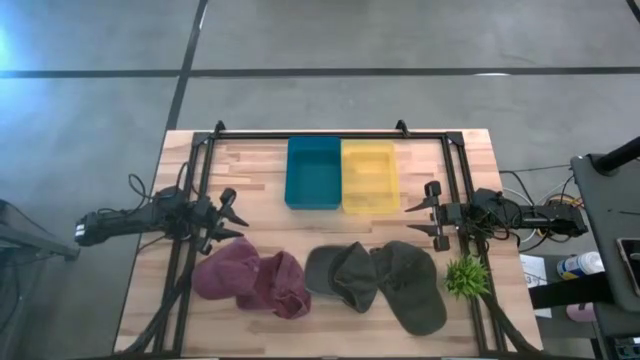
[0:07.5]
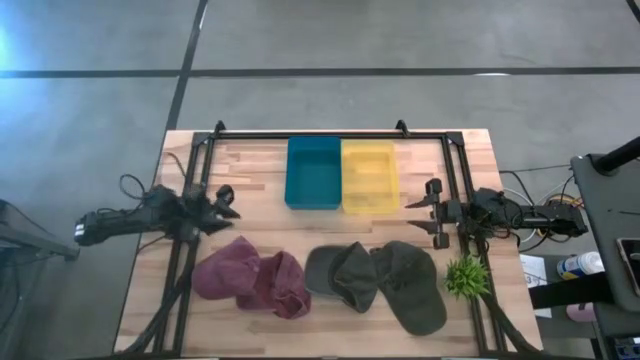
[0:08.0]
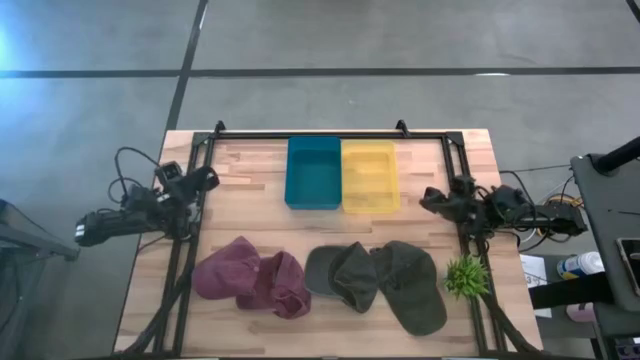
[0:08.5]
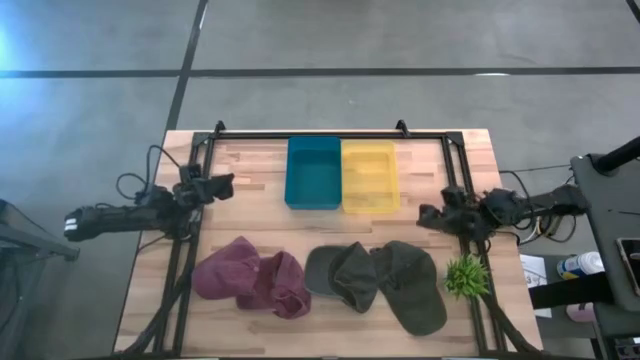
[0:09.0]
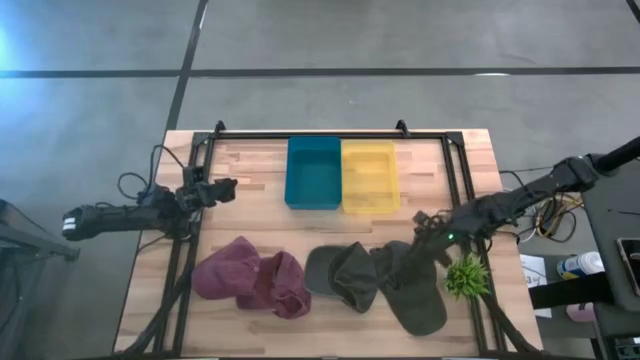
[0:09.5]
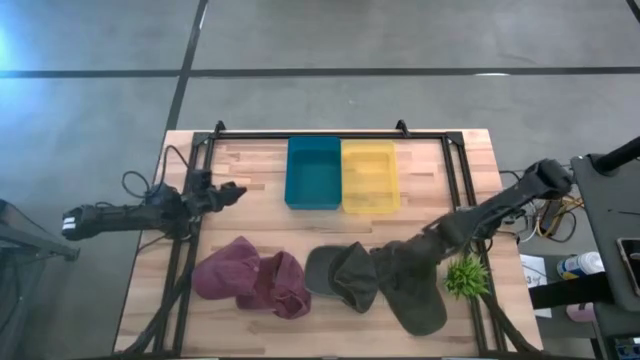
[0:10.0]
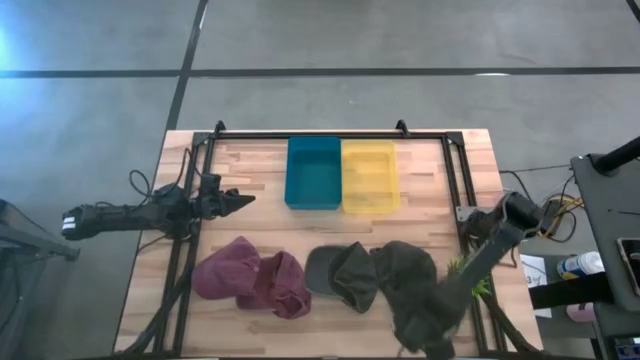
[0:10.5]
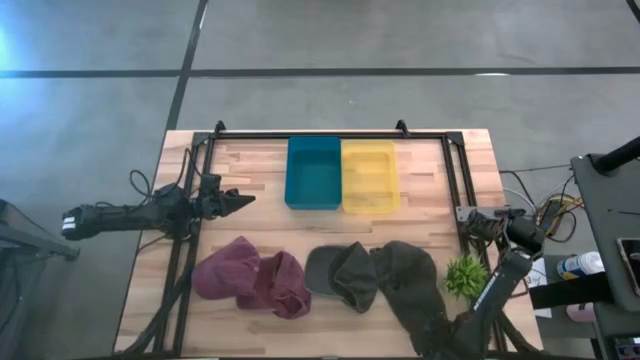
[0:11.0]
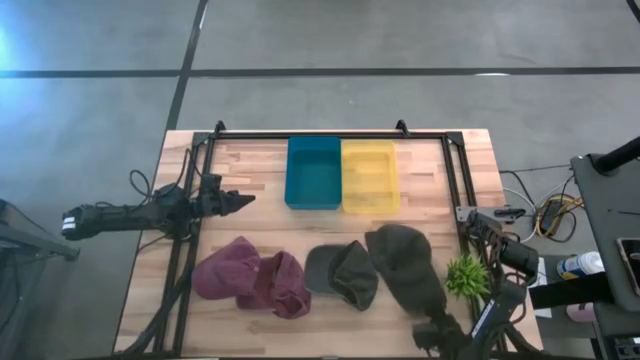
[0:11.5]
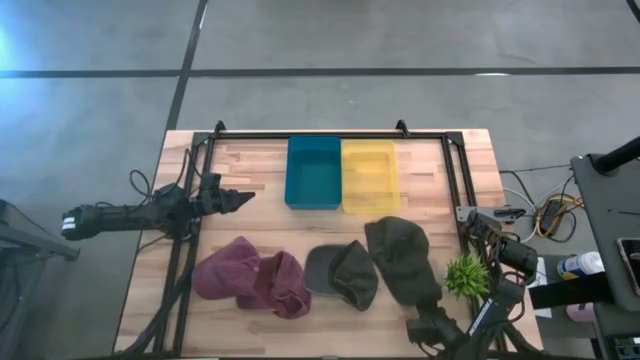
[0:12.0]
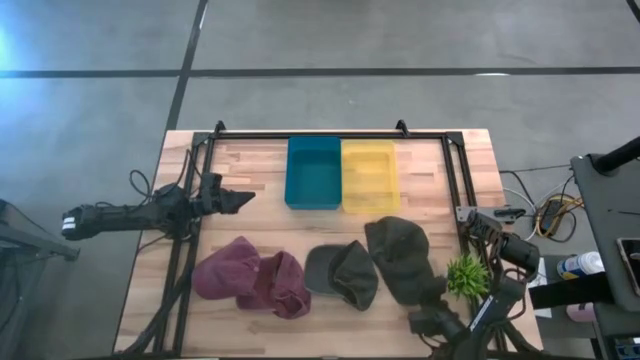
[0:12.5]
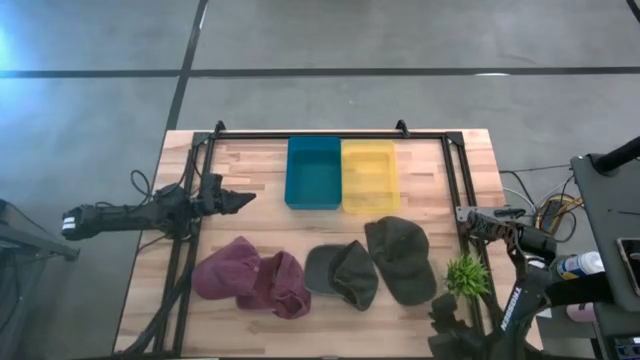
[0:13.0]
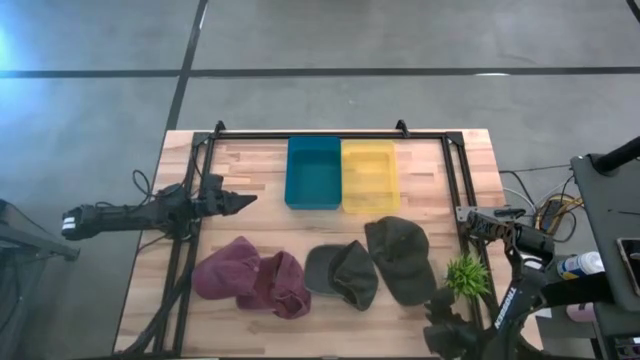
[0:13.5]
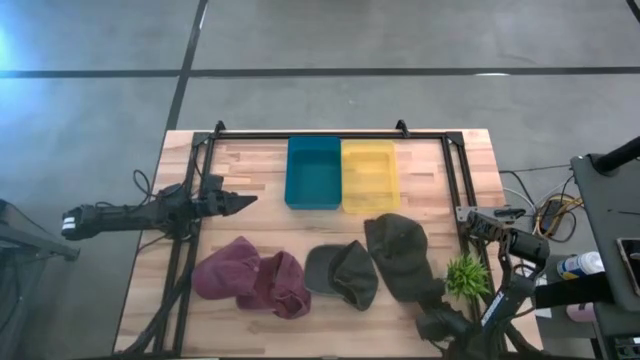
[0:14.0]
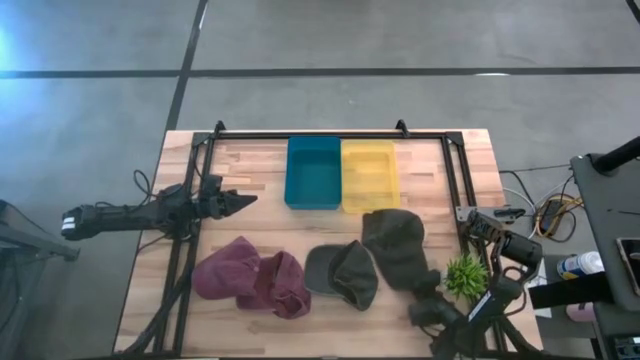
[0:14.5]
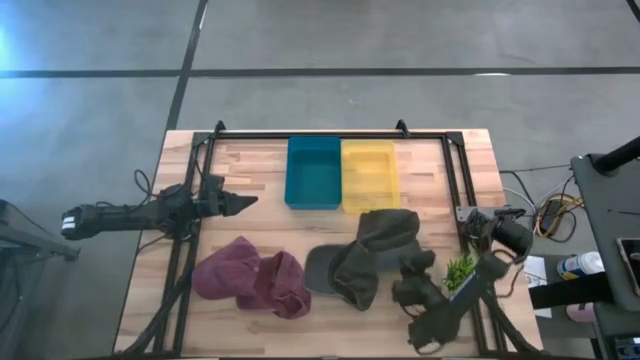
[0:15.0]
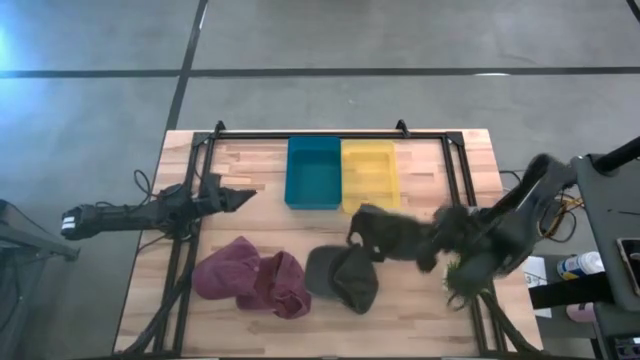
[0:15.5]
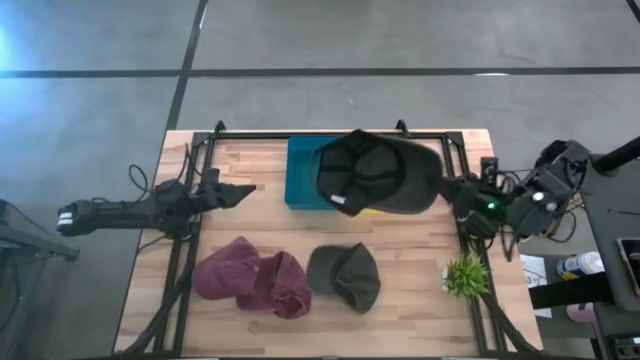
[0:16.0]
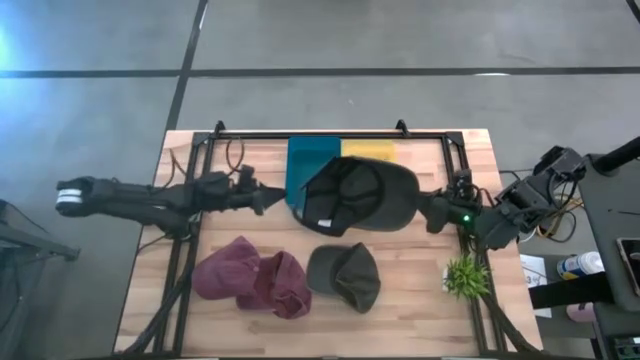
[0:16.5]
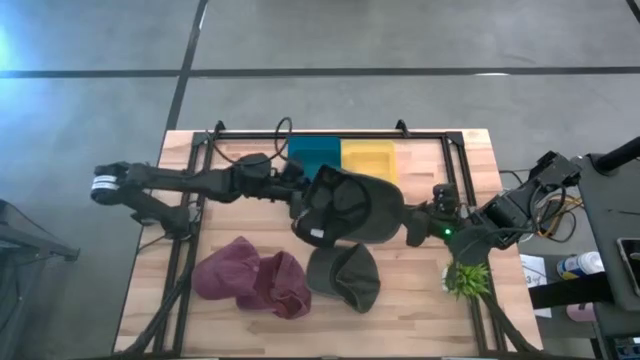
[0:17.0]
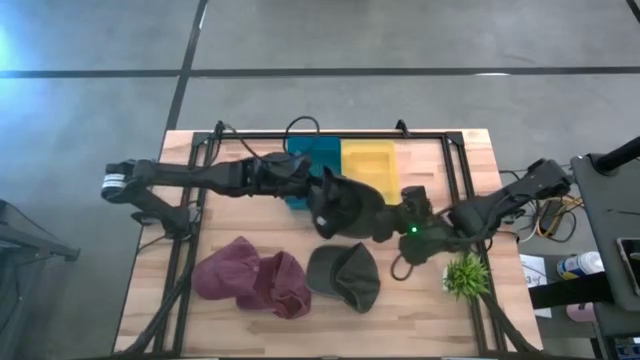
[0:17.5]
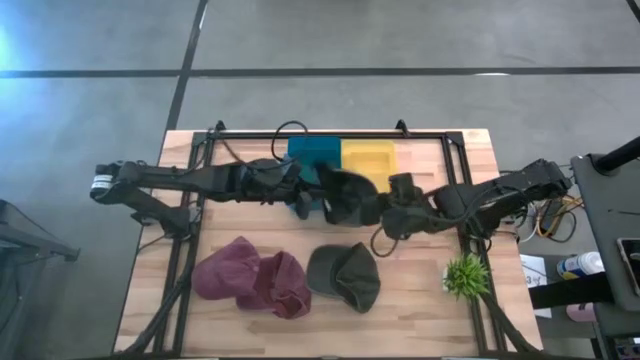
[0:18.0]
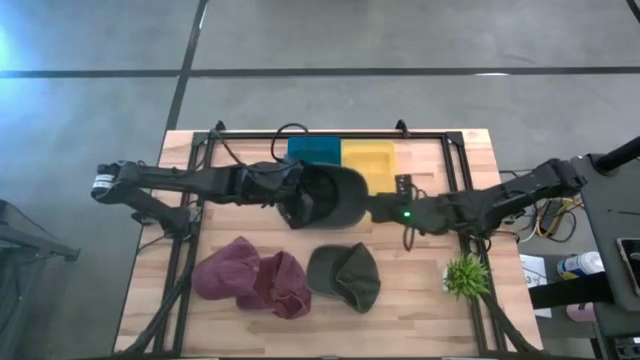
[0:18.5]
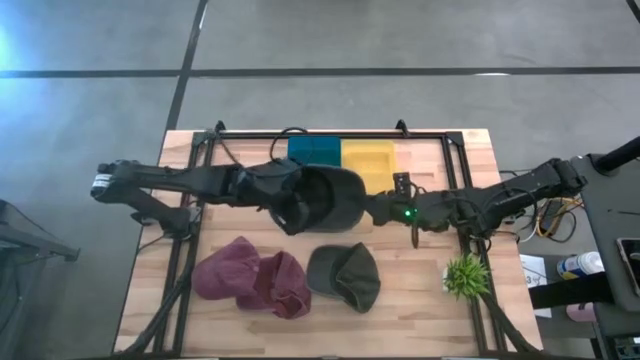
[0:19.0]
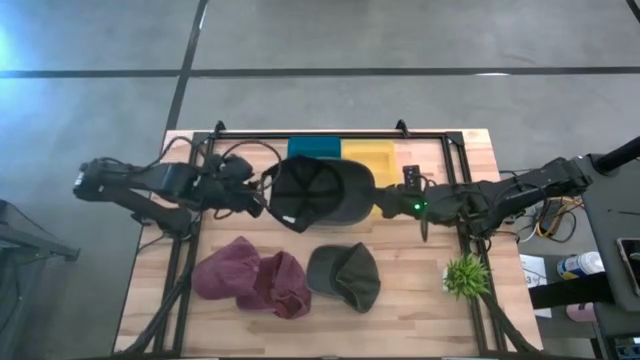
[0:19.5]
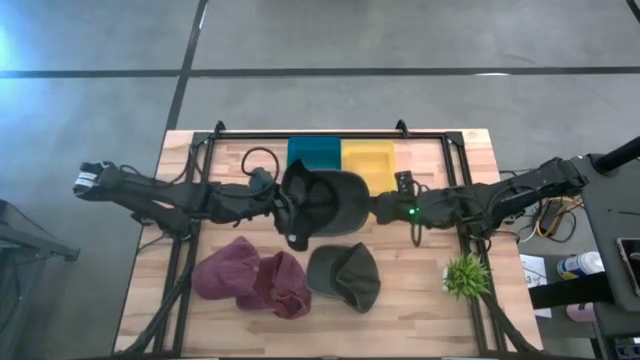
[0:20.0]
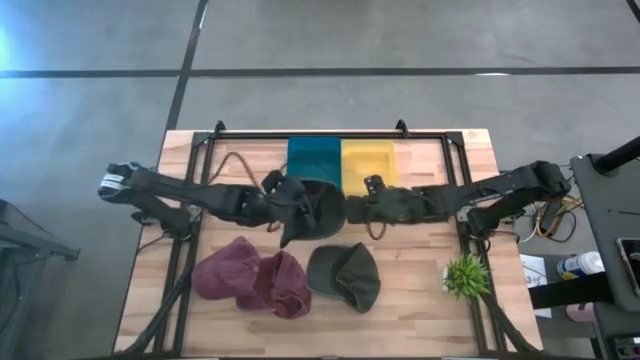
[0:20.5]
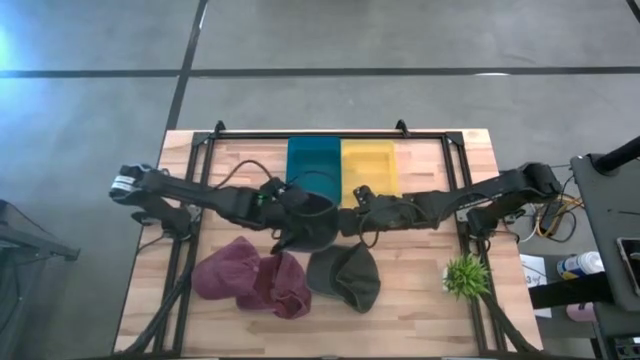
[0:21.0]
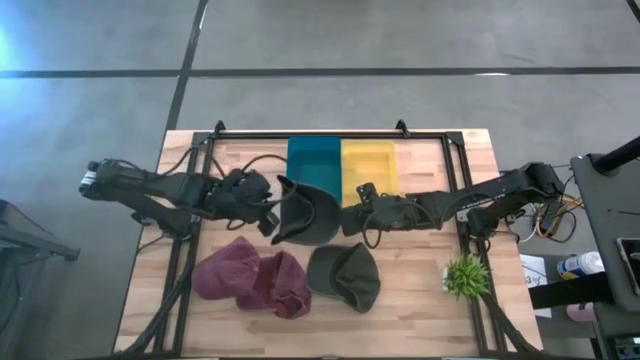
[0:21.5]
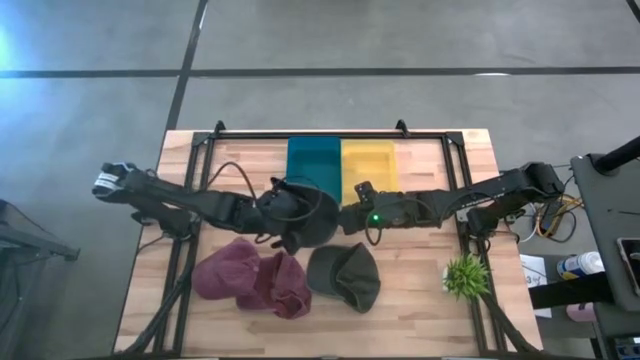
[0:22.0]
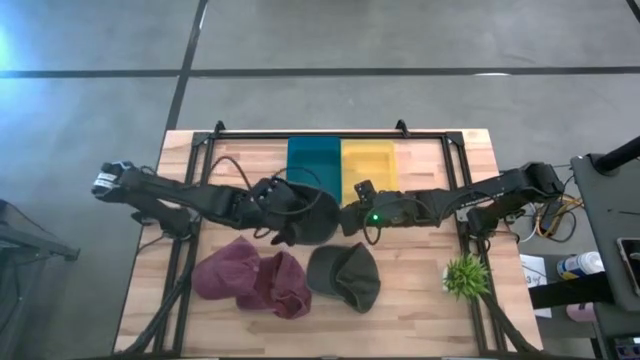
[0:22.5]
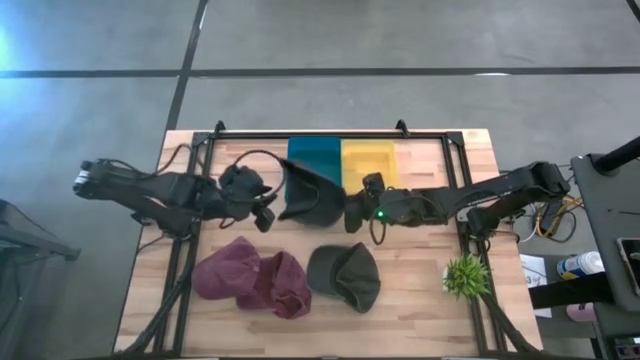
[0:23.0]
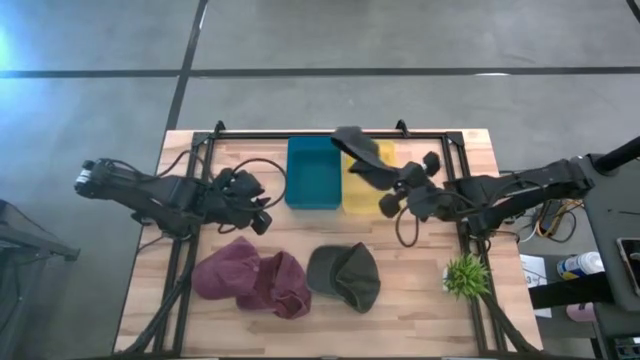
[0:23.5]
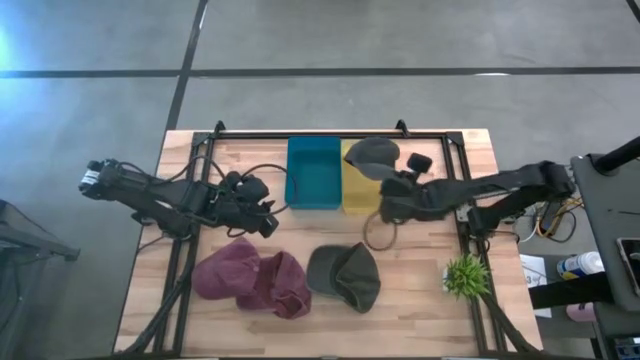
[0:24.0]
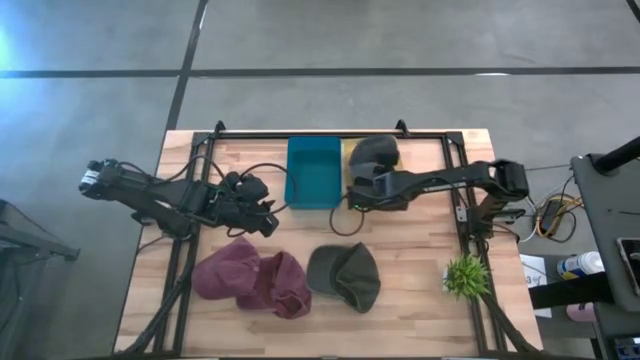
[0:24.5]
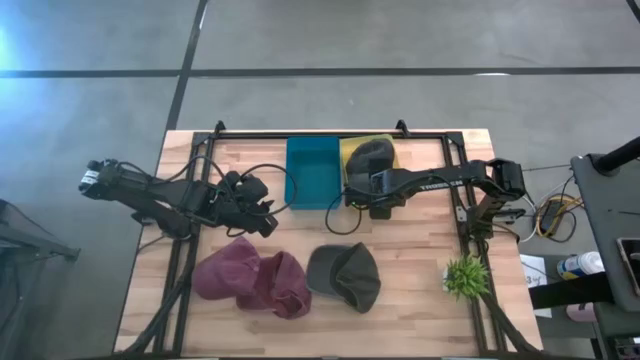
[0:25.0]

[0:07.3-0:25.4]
Task: Pick & Place hat
Put the right gray cap into the yellow bin
